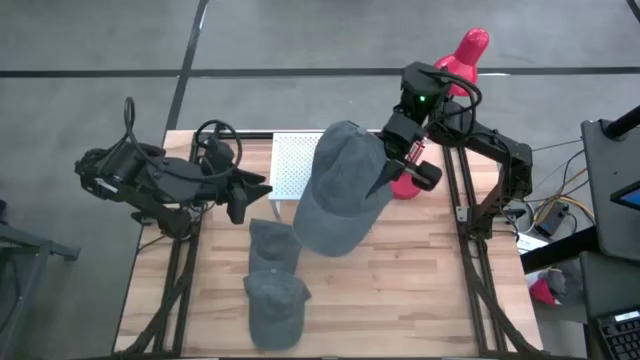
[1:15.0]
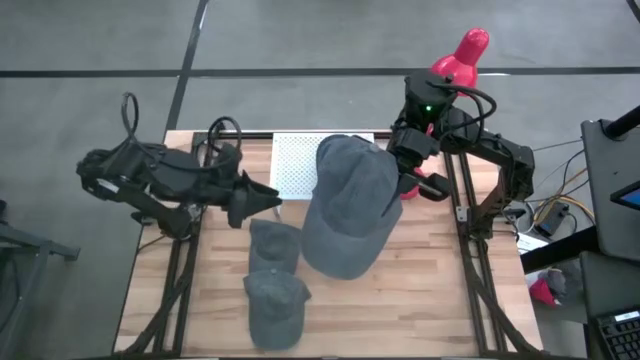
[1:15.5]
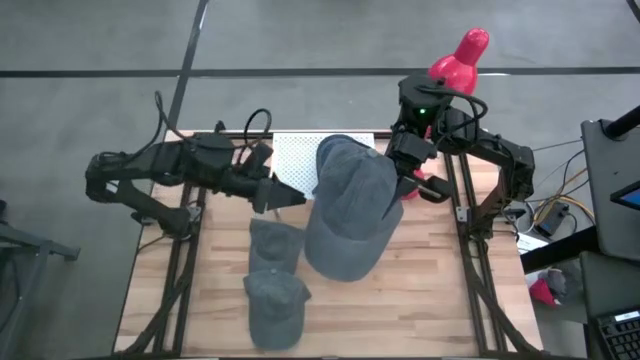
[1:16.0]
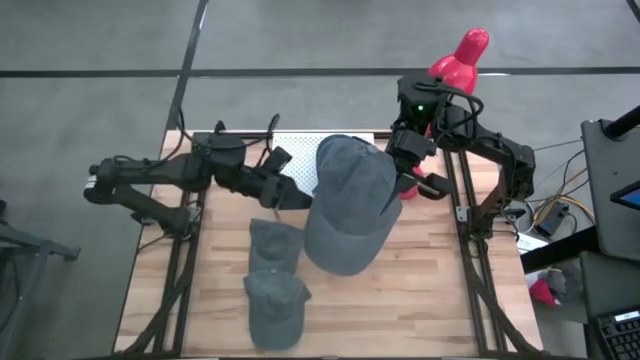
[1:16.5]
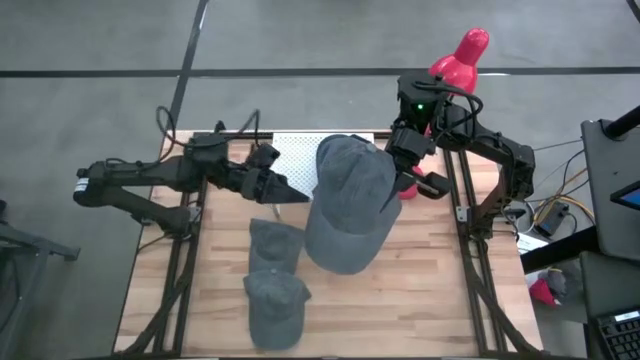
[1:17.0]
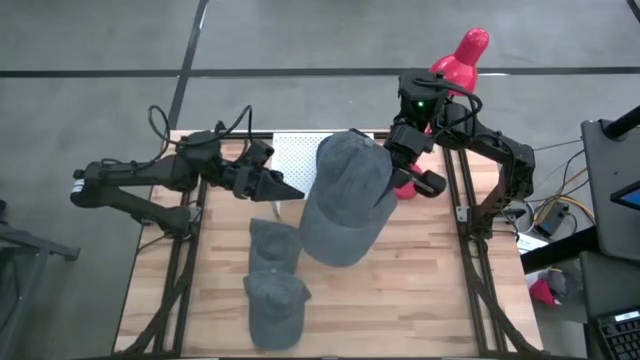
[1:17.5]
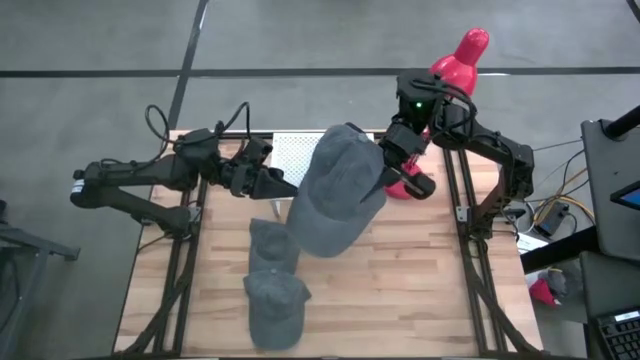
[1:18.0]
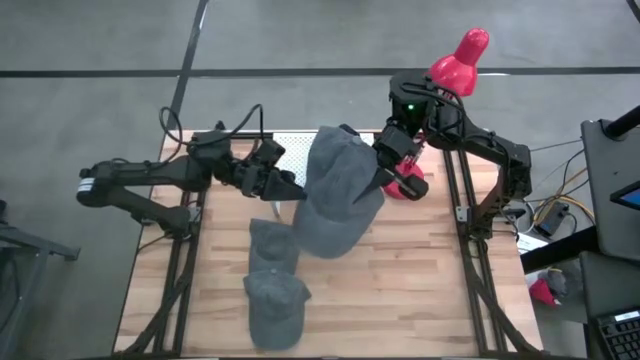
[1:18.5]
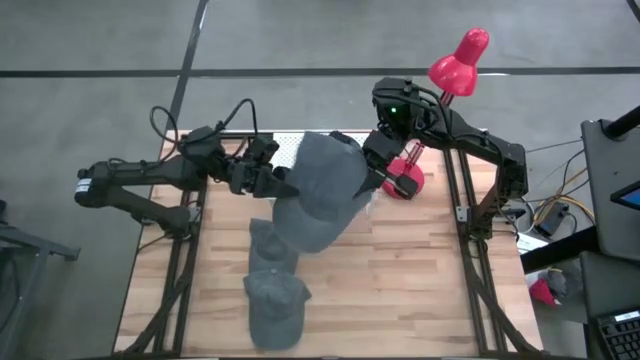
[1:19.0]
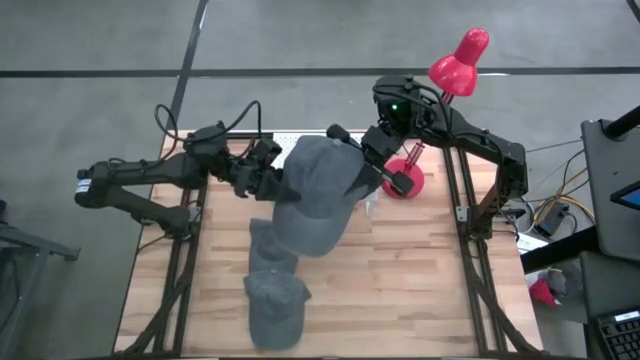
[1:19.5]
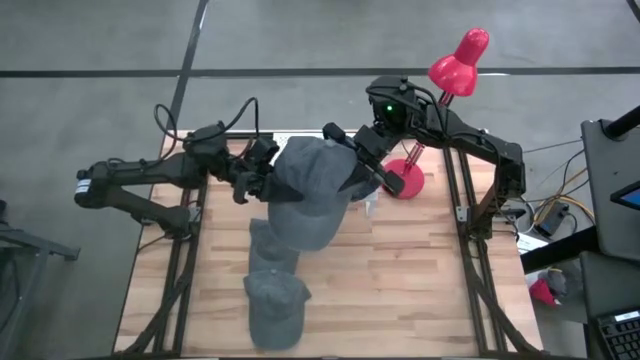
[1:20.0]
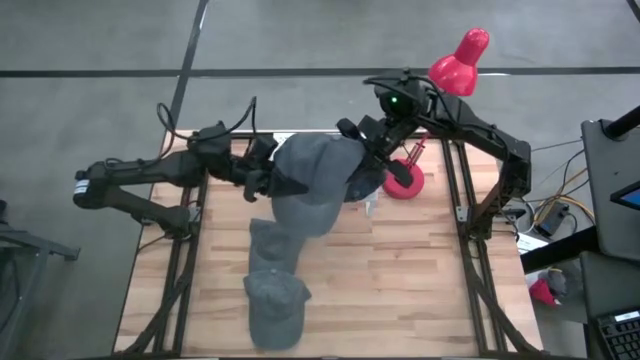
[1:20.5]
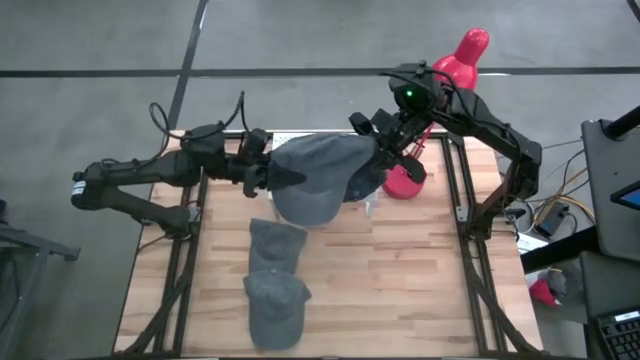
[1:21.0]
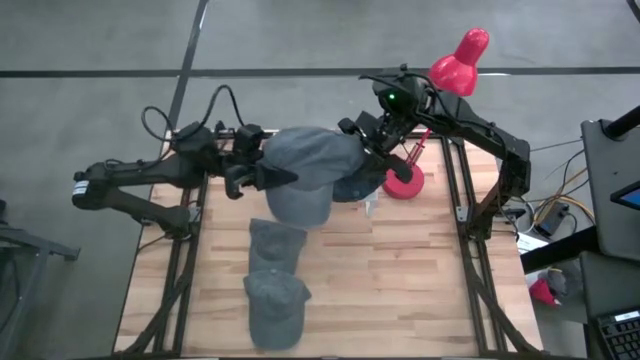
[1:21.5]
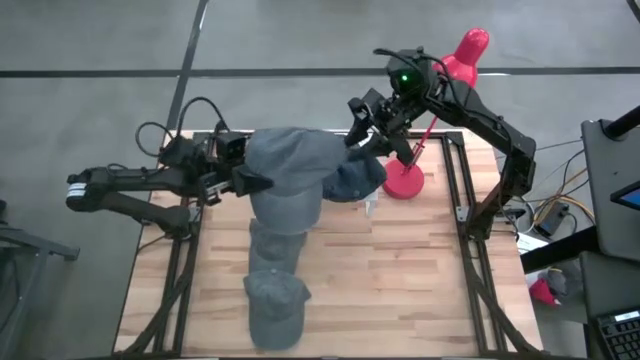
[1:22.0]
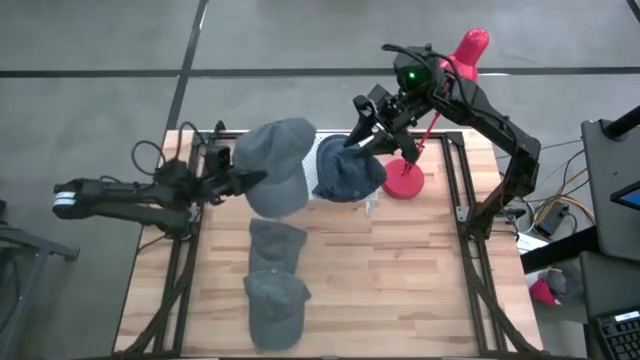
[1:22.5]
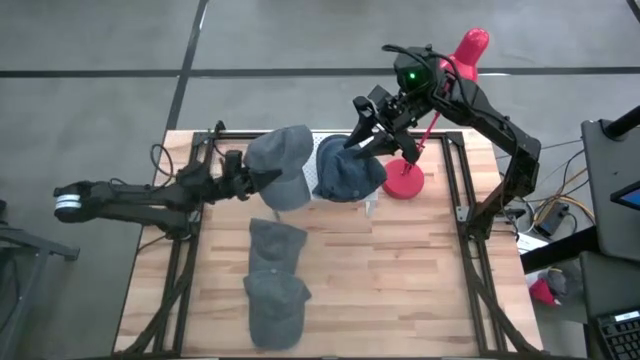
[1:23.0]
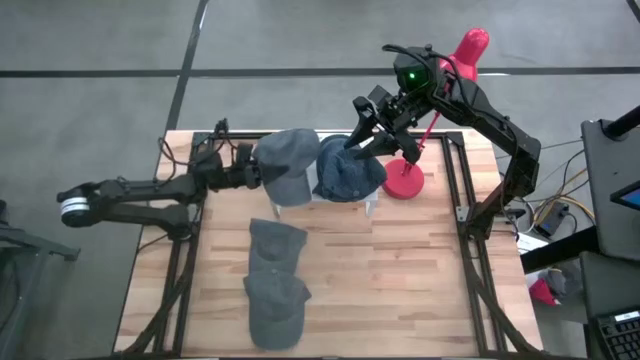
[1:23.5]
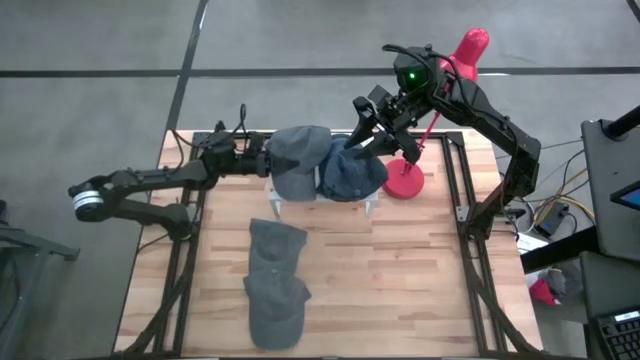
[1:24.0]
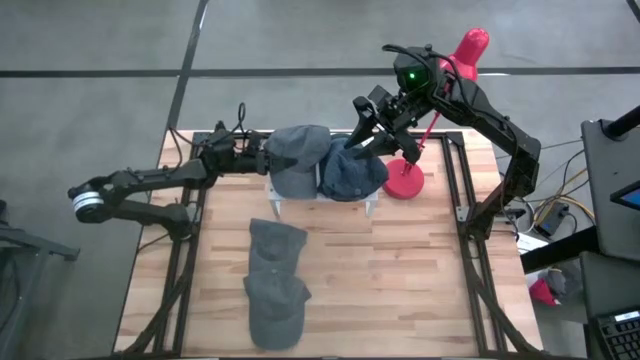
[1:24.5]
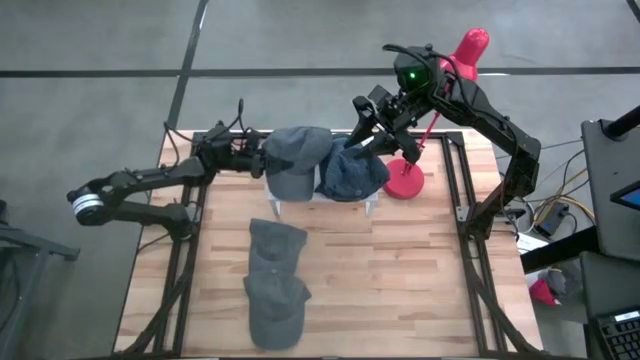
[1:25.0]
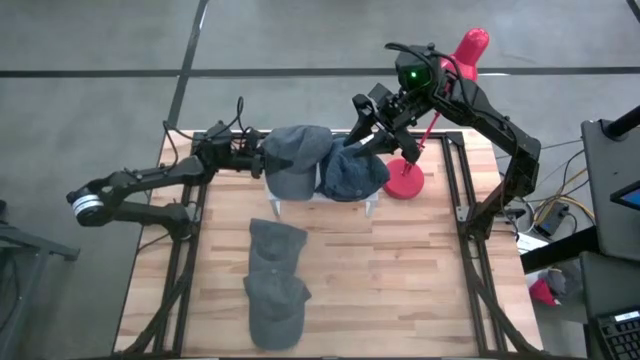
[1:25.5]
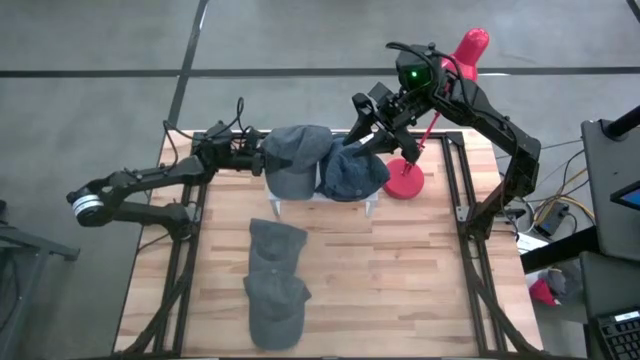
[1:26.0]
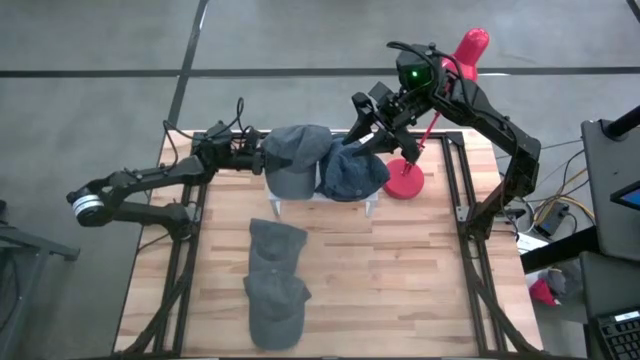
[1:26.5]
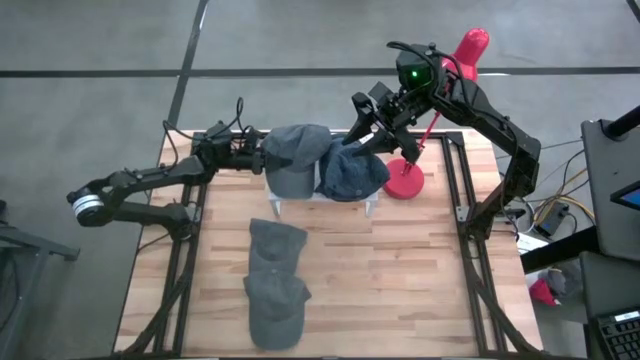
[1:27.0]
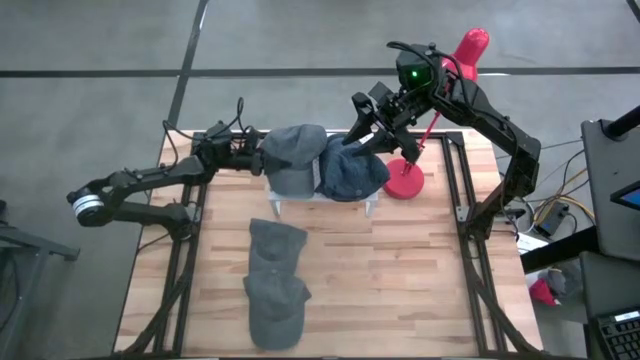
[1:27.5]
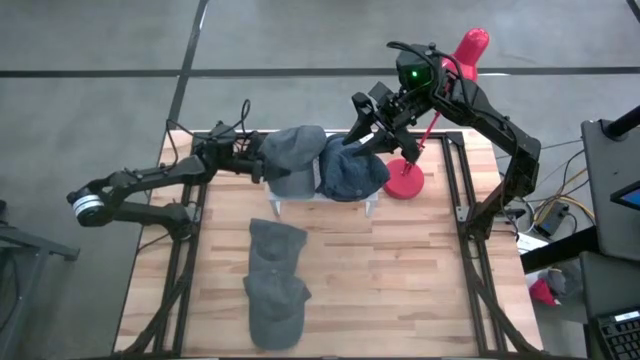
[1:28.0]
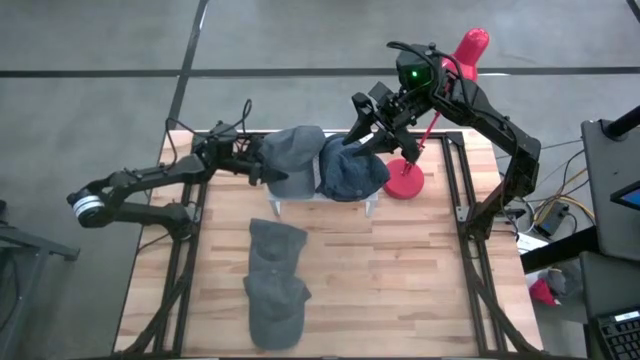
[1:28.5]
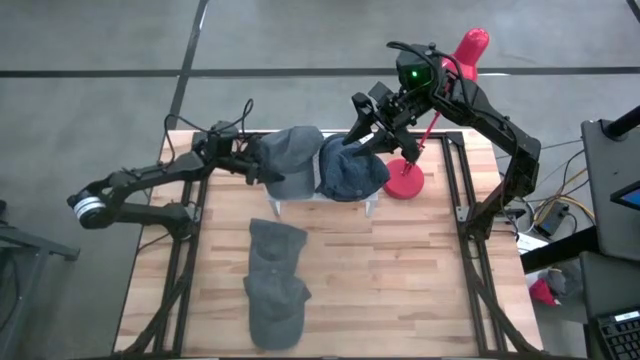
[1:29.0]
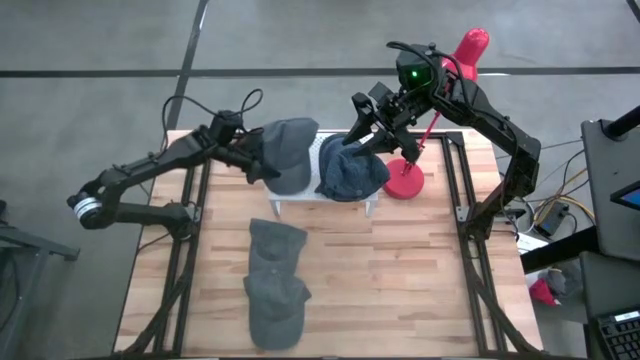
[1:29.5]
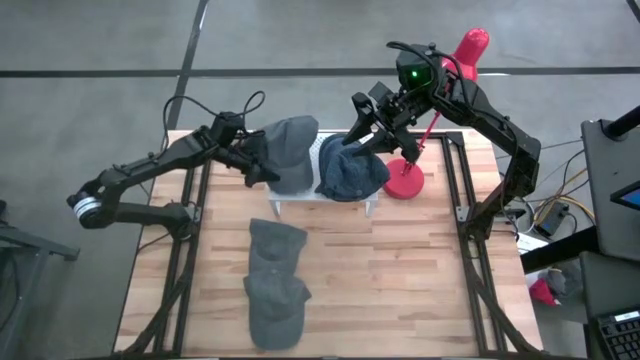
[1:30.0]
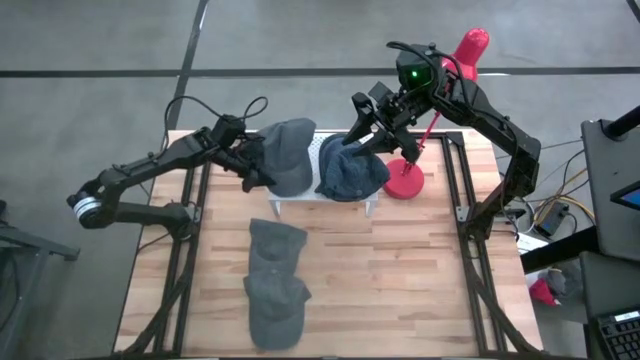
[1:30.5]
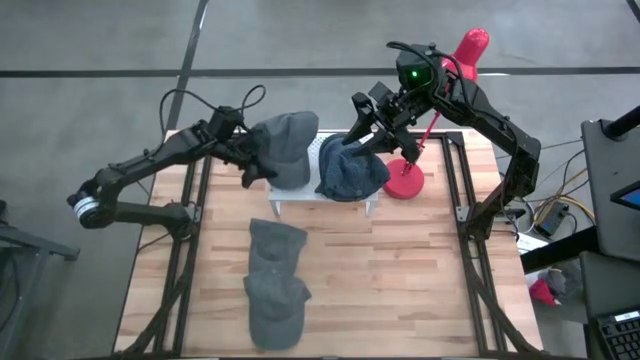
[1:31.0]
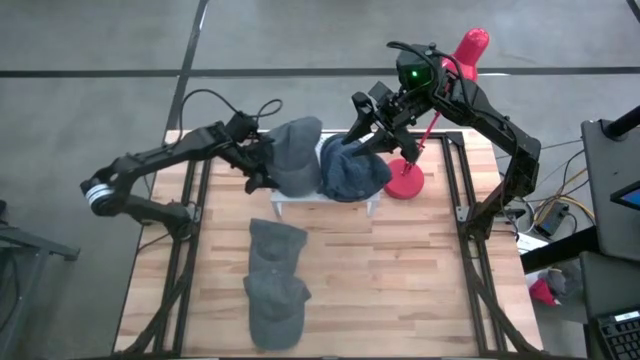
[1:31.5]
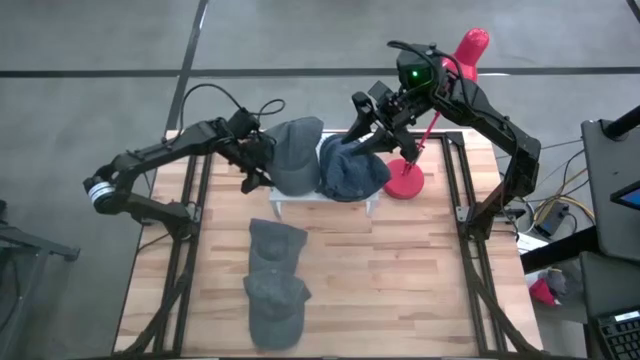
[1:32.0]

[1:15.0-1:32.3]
Task: Pick & Place hat
Put the left gray cap on the shelf

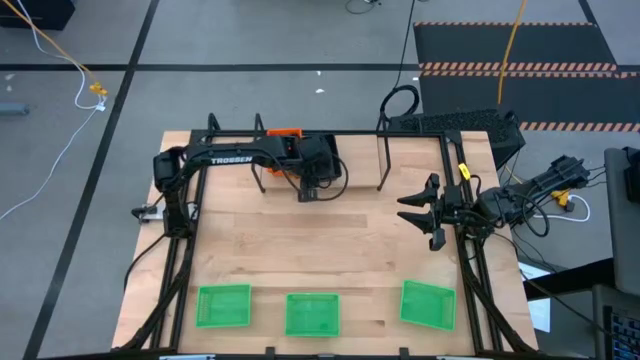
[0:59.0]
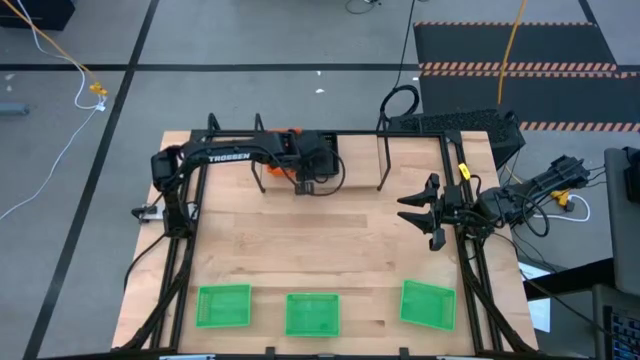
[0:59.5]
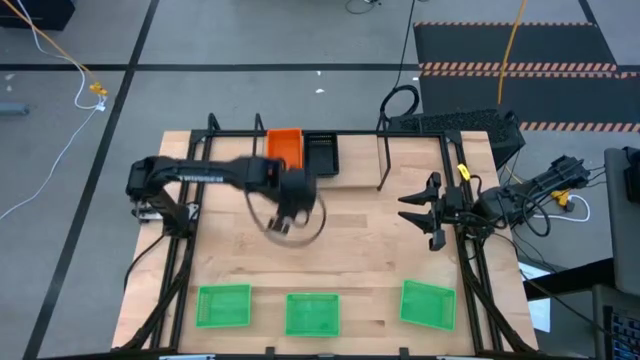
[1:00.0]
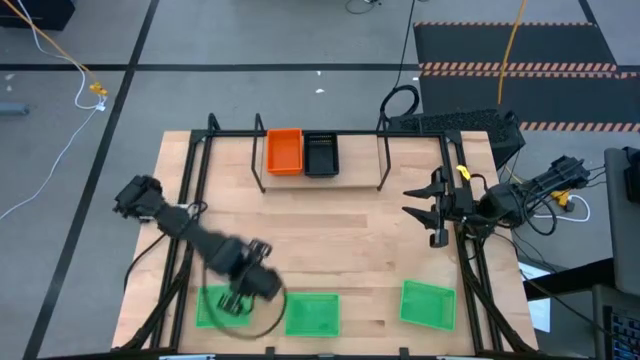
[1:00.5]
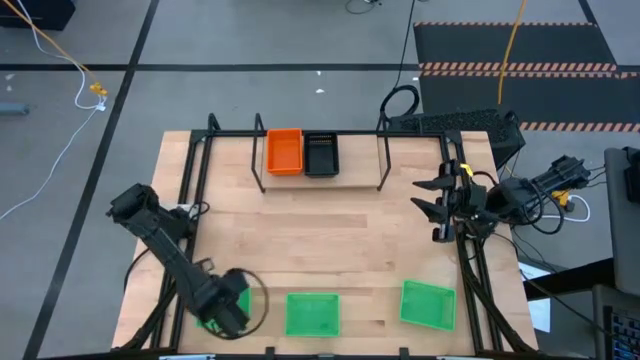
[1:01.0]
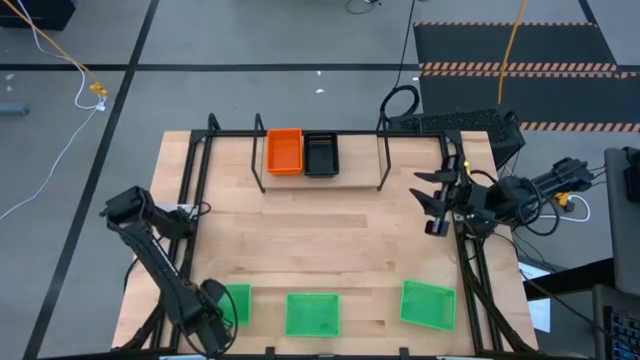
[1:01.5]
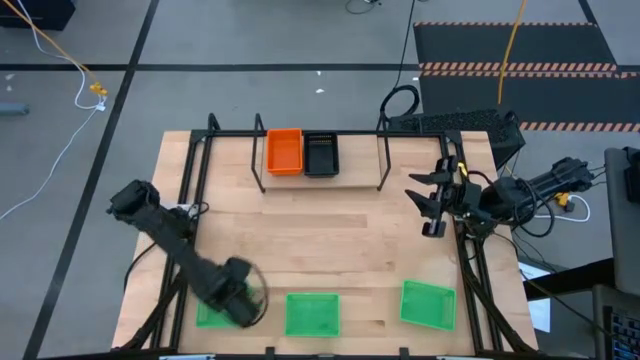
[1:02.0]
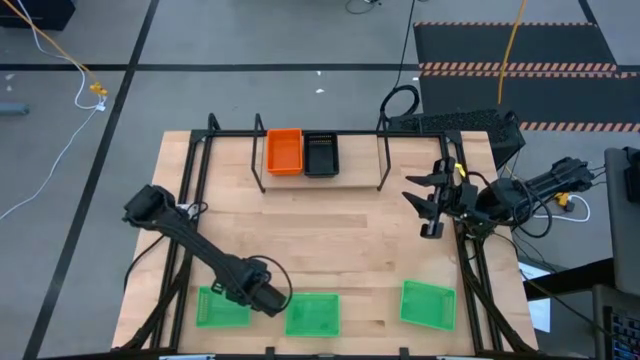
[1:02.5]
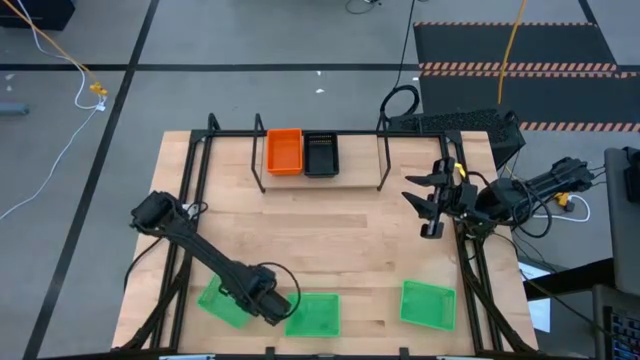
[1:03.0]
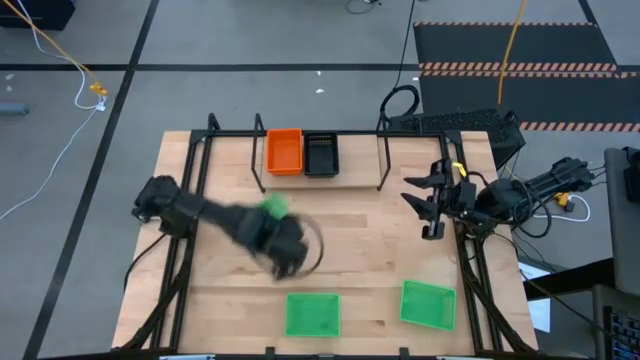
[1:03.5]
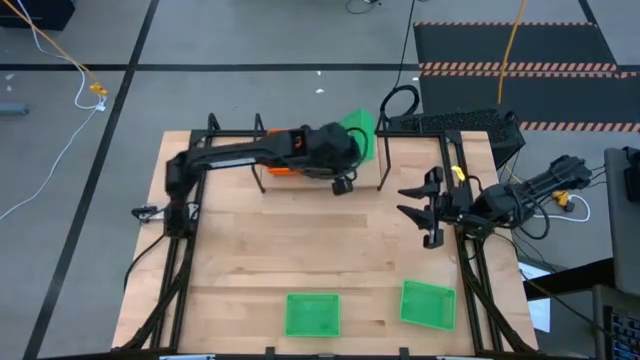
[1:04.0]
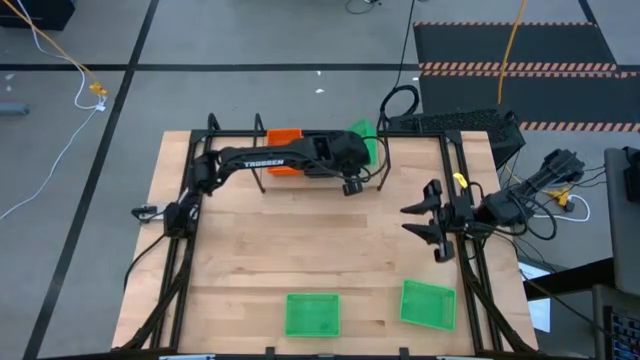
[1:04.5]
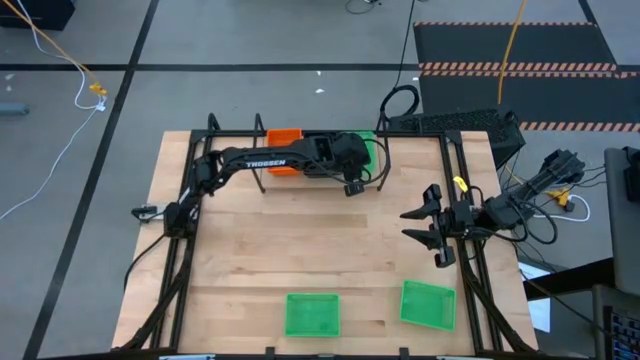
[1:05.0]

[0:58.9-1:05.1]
Task: Stack baskets on shelf by color
Put the bottom left green basket on the shelf
